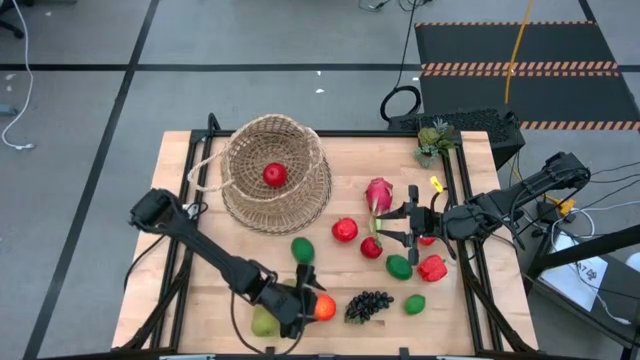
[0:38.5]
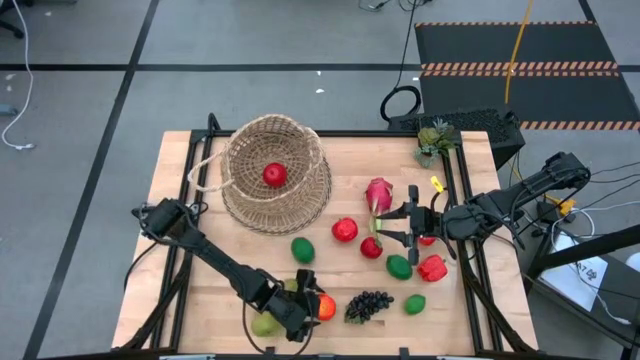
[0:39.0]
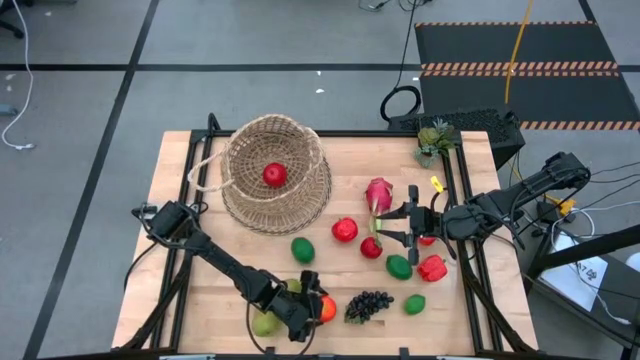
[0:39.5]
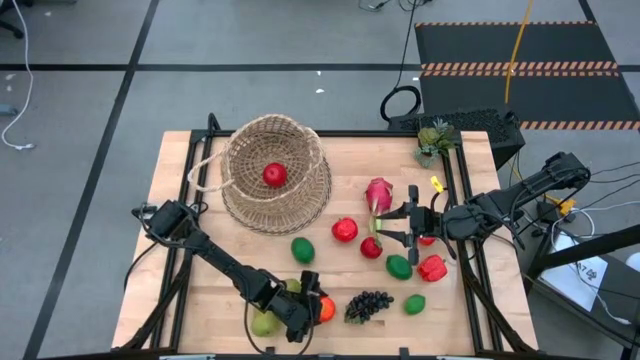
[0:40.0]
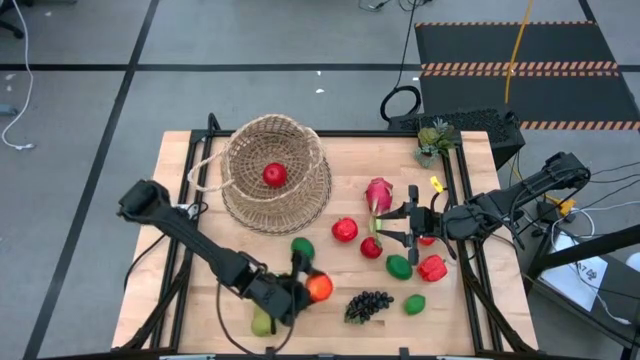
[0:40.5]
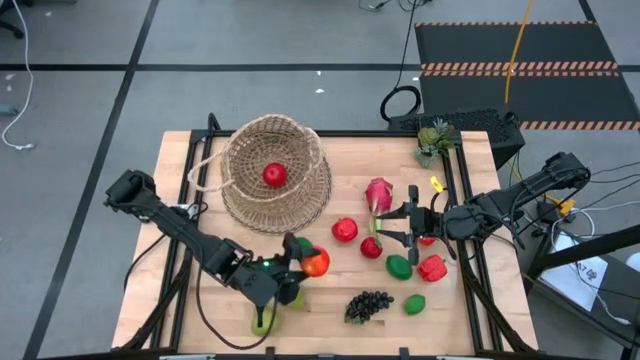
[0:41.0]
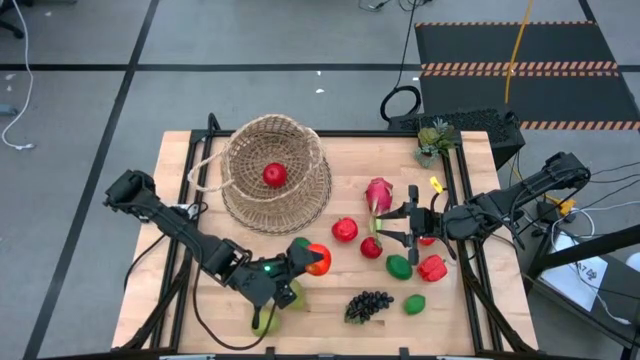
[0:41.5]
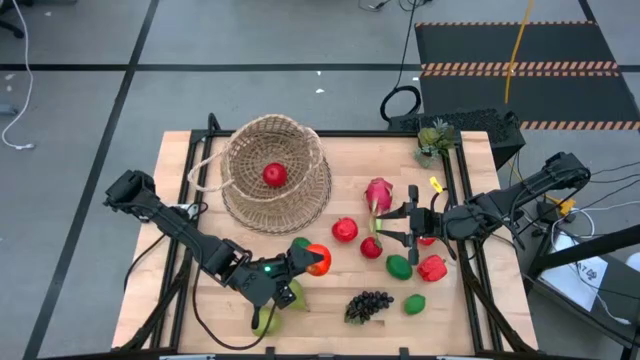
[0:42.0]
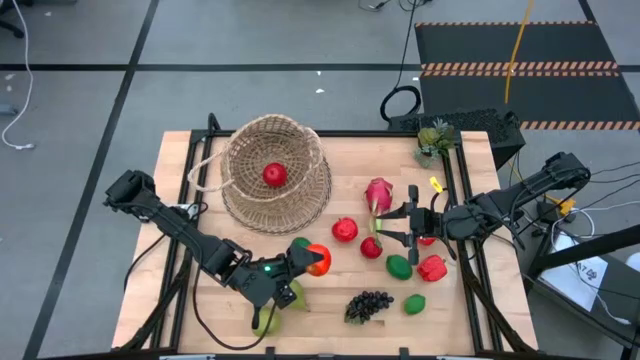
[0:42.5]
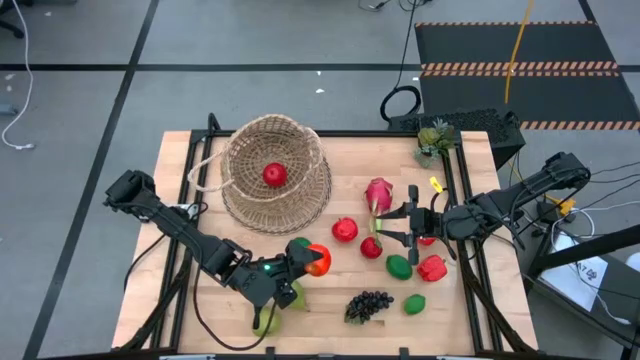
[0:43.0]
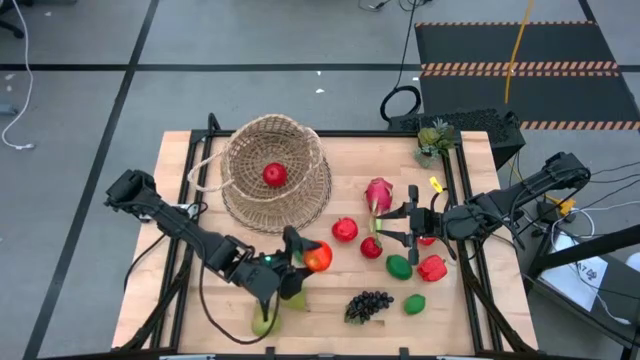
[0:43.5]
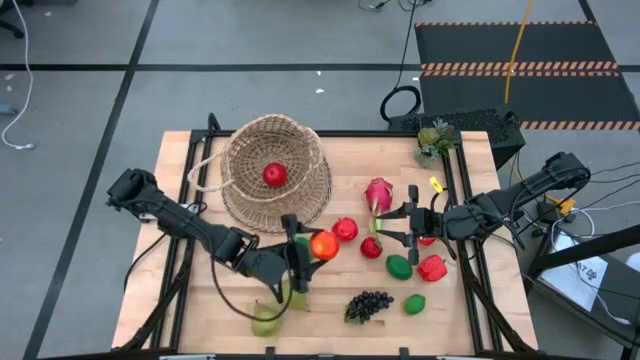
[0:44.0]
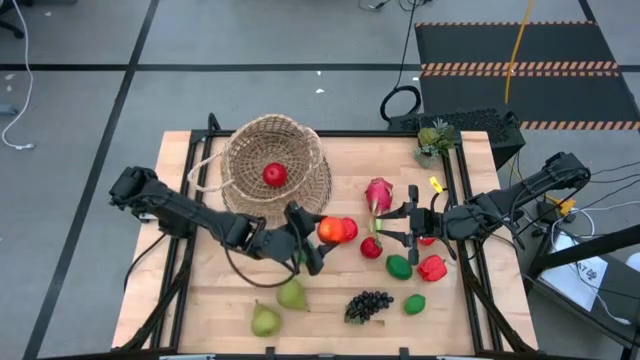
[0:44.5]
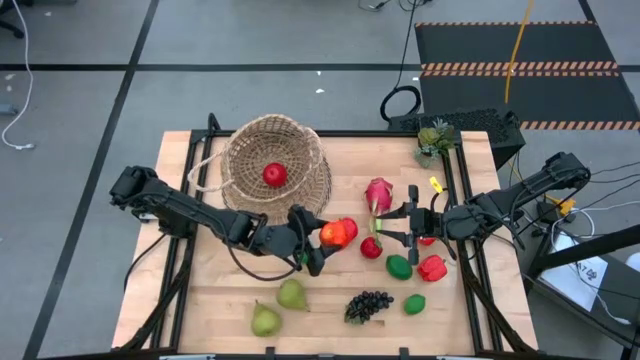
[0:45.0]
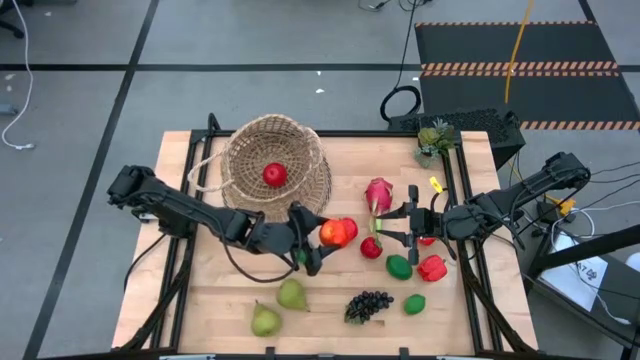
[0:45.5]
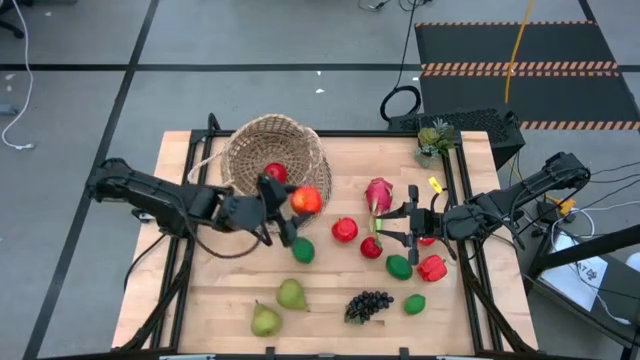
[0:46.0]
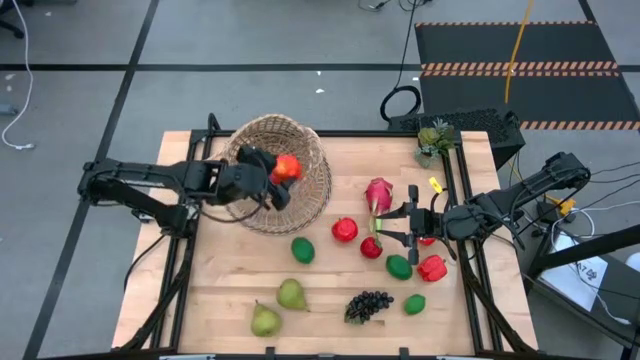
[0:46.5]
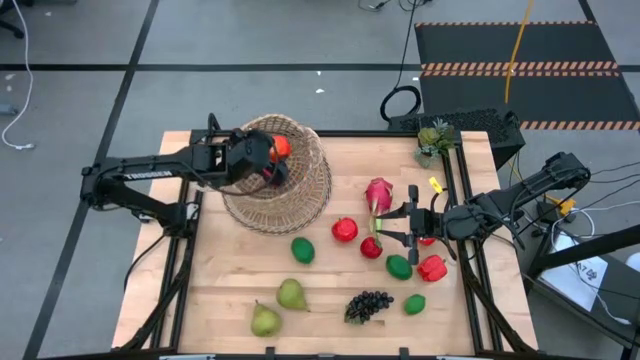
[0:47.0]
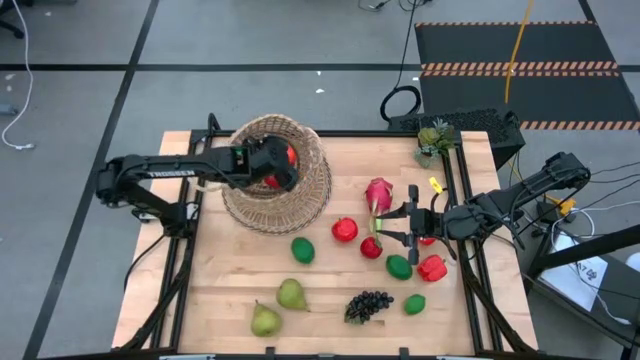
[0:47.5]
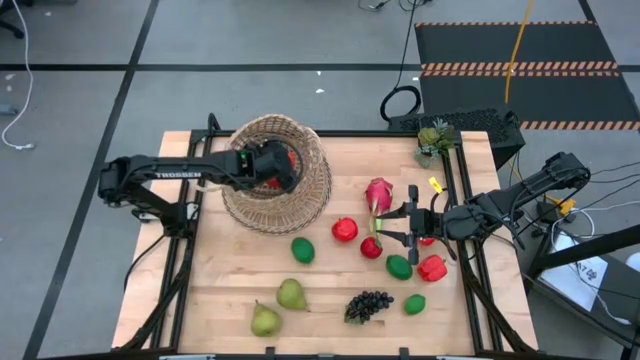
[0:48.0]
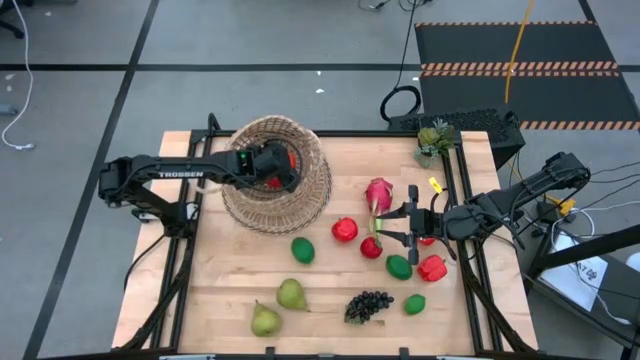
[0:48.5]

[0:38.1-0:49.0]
Task: Build produce basket
Put the apple into the basket

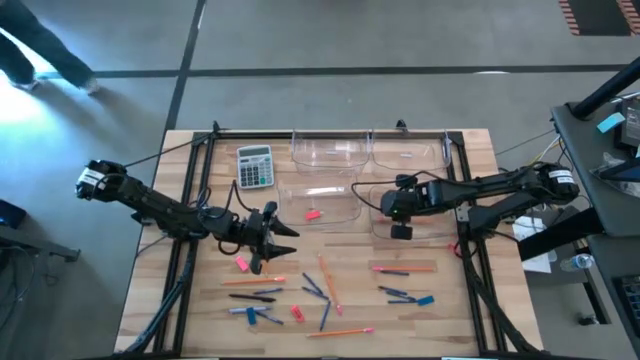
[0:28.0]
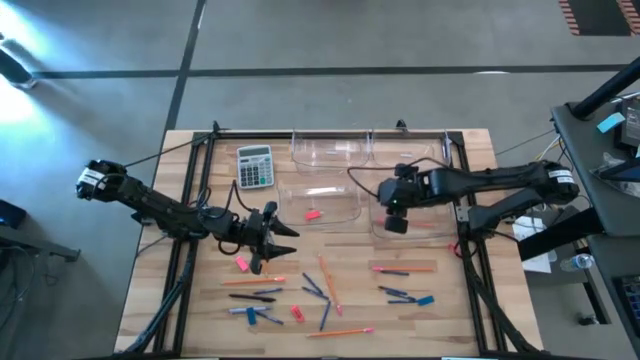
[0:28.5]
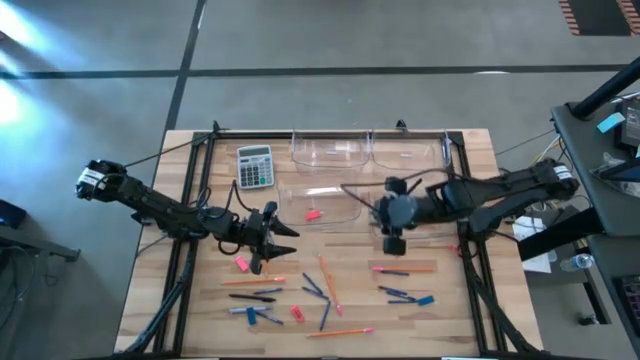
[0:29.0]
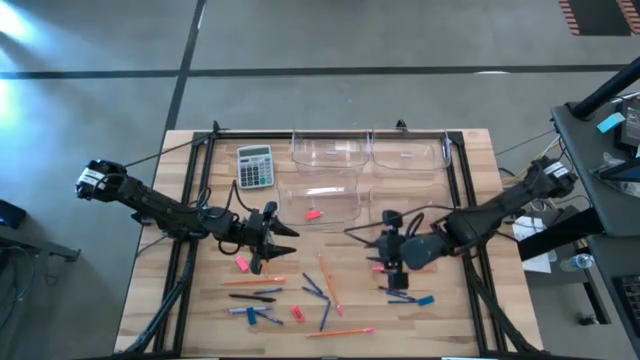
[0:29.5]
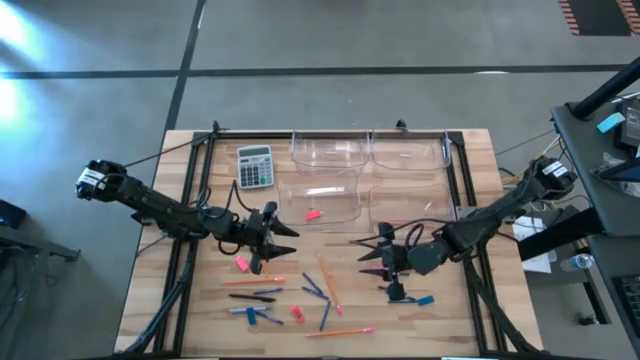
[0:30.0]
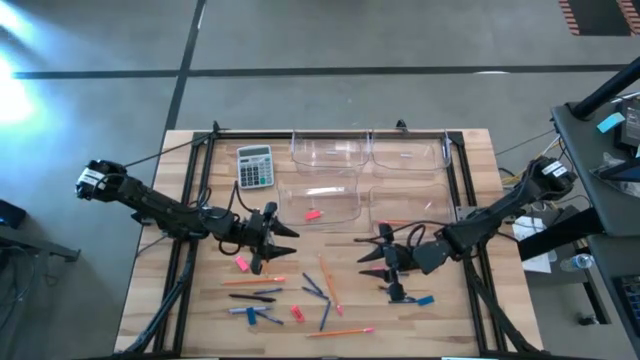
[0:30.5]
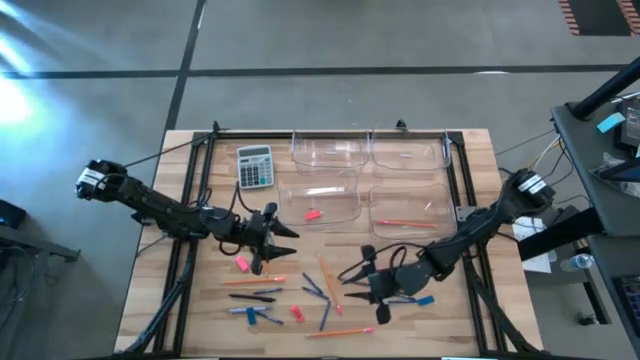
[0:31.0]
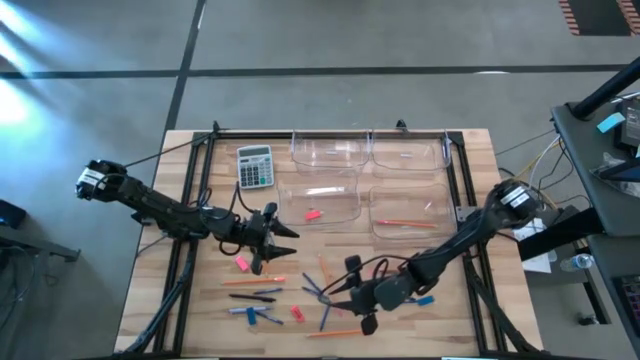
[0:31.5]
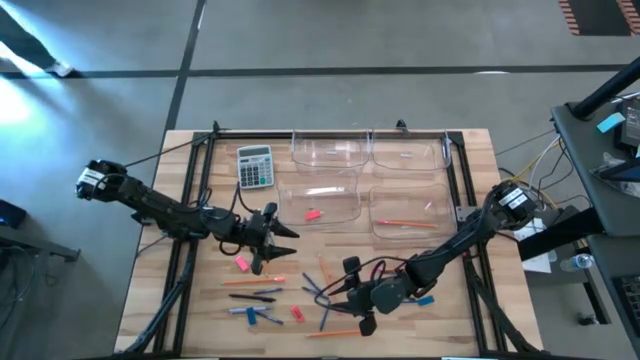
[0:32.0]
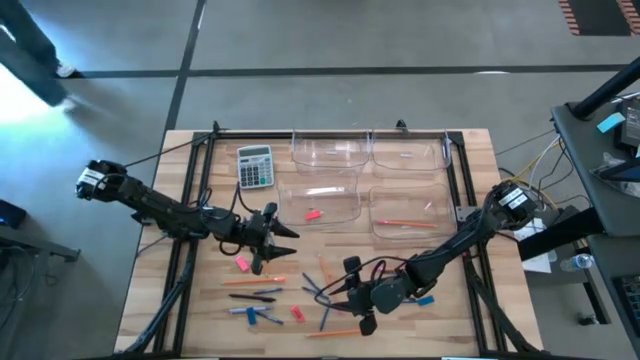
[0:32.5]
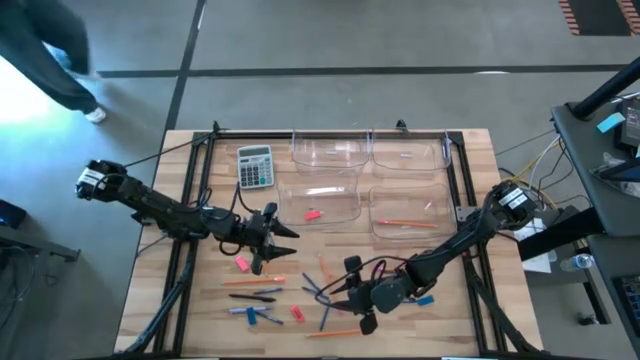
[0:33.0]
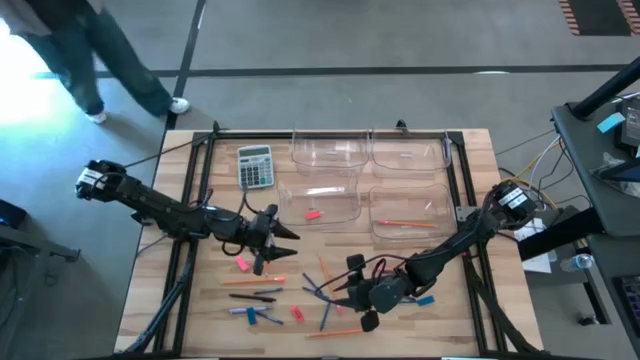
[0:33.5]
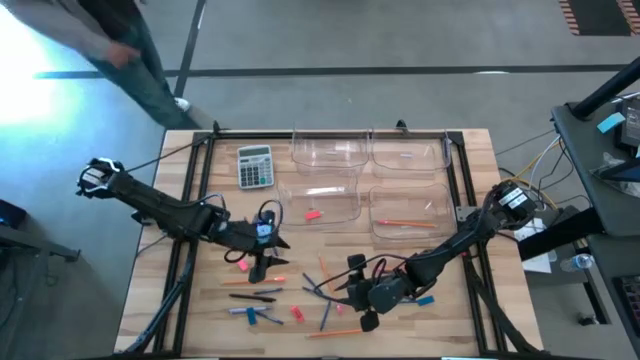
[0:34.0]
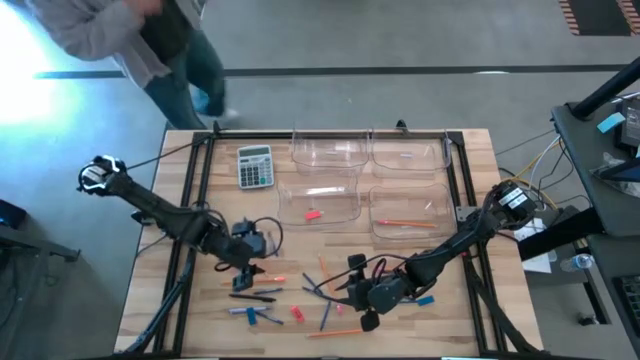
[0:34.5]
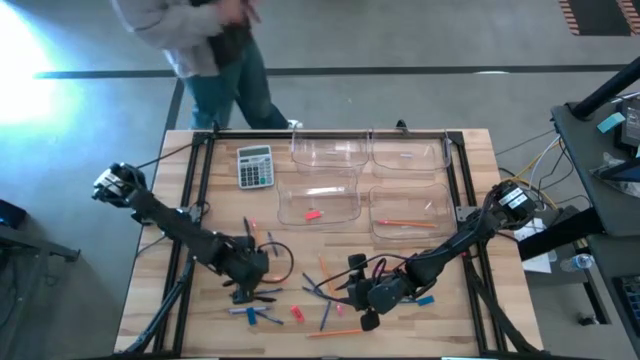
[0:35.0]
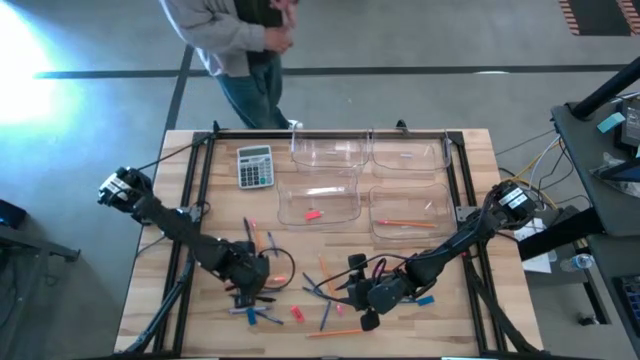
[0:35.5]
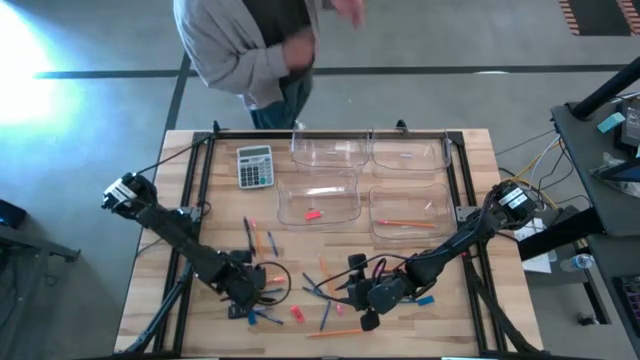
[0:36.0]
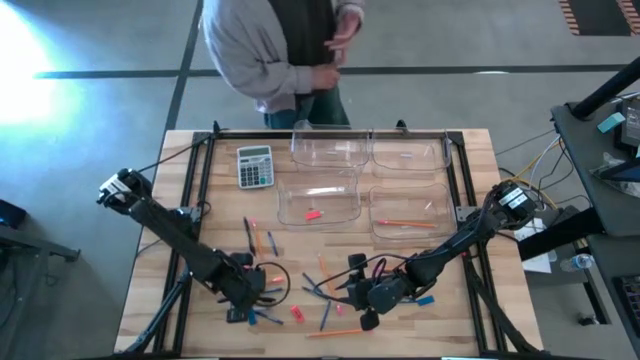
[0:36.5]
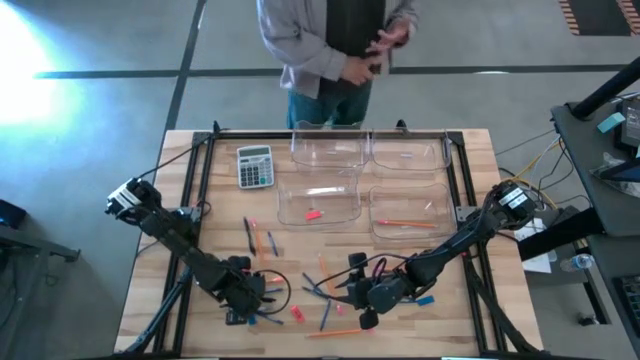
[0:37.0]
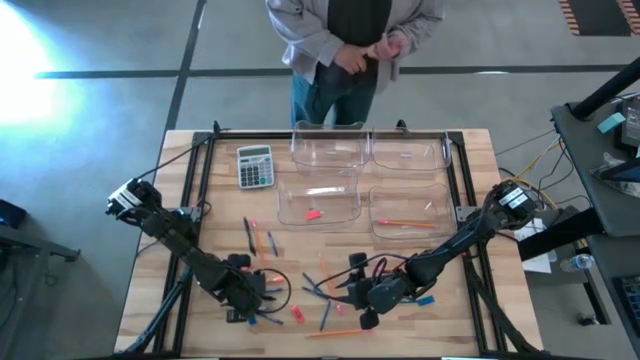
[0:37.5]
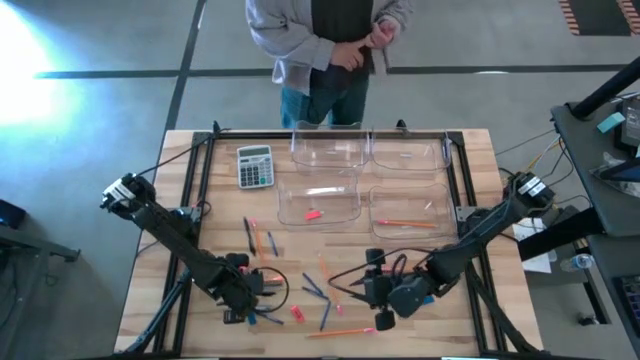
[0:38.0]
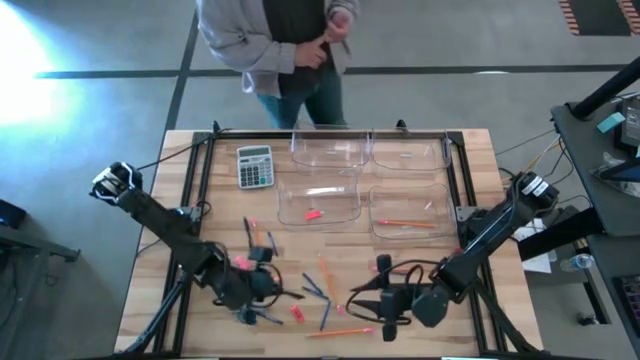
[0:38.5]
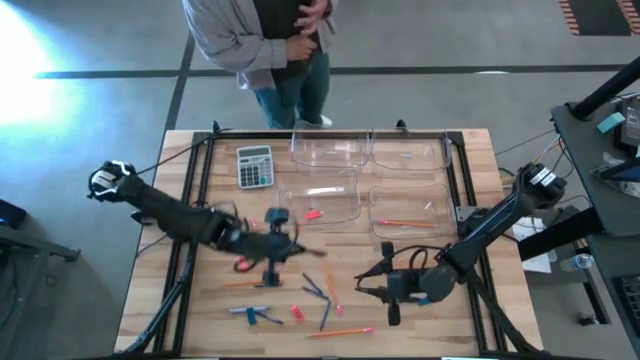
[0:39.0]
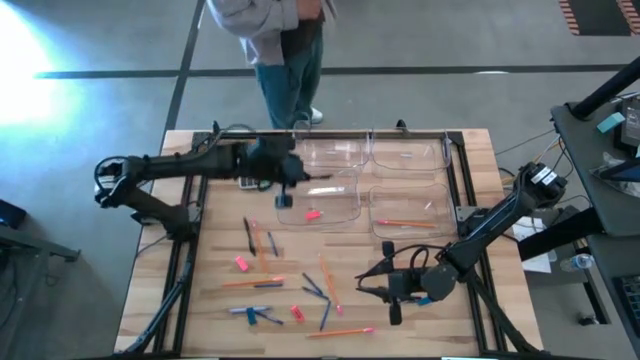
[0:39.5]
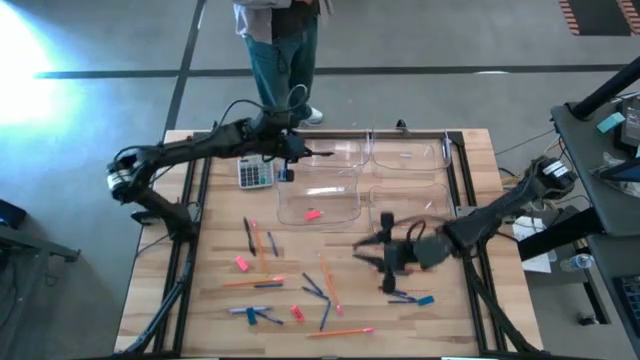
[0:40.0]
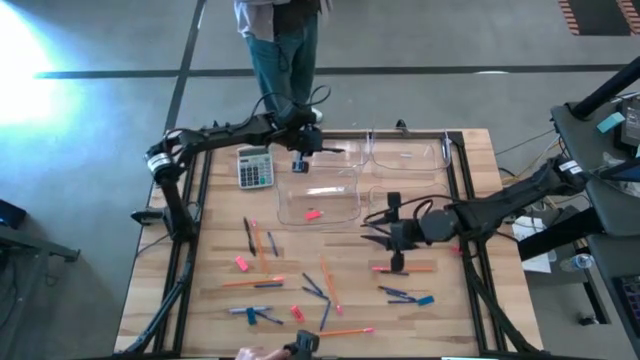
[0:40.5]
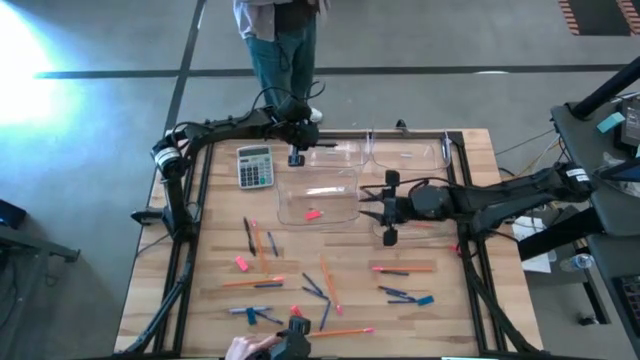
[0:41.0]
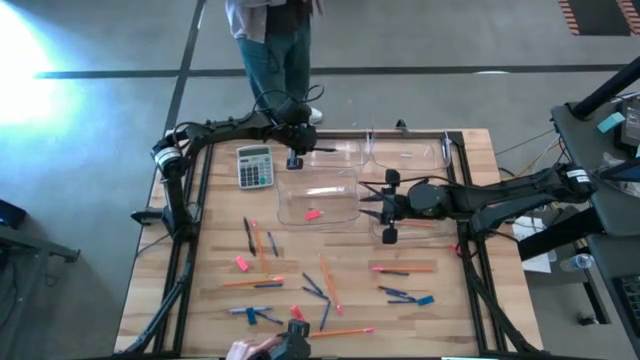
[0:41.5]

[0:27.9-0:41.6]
Task: Sort crayons/erasers/pens/pencils in bins
Put the black pen into the top left transparent bin
